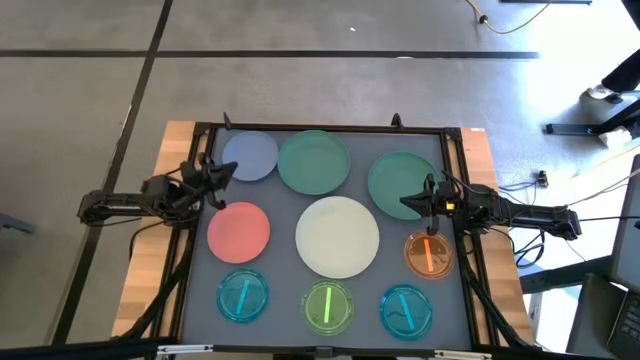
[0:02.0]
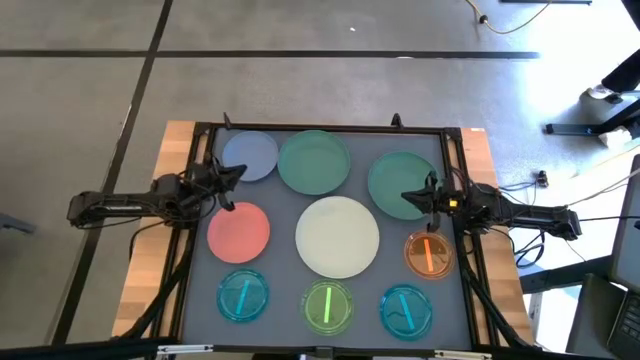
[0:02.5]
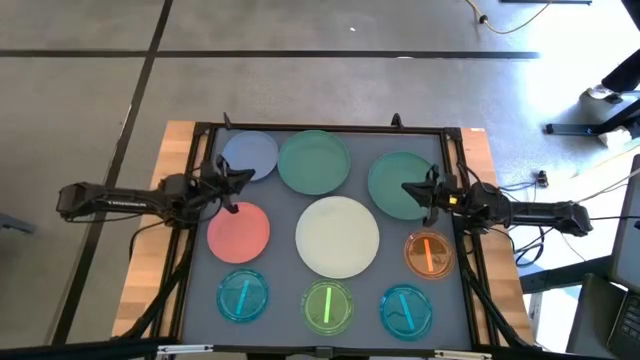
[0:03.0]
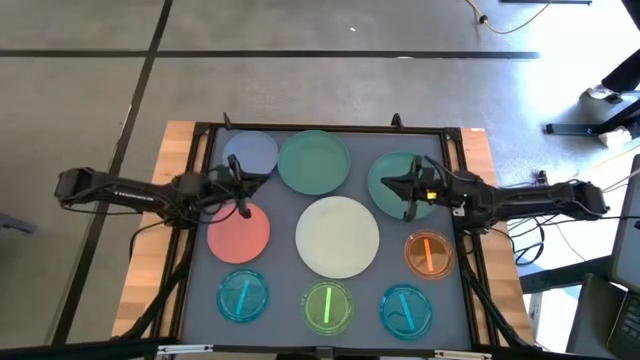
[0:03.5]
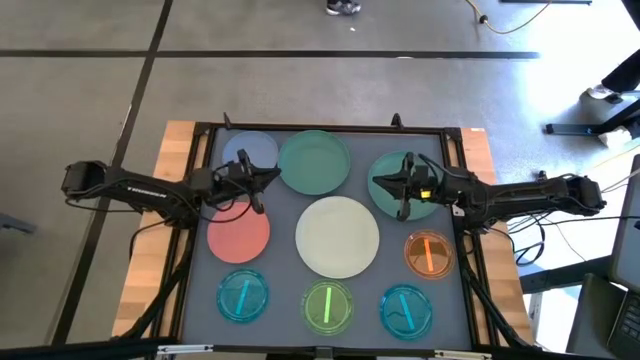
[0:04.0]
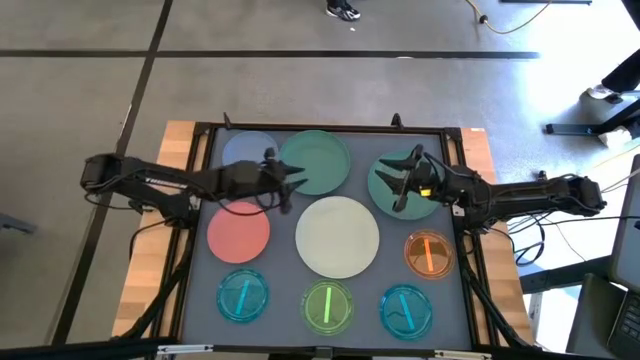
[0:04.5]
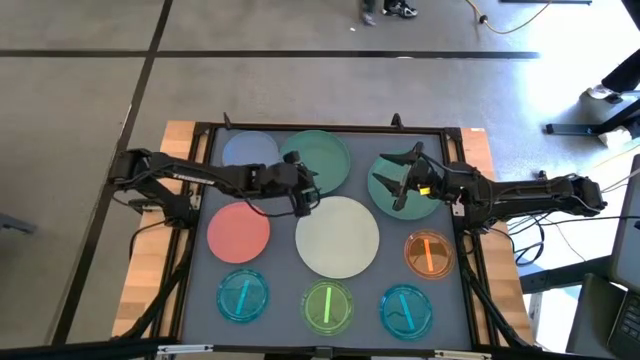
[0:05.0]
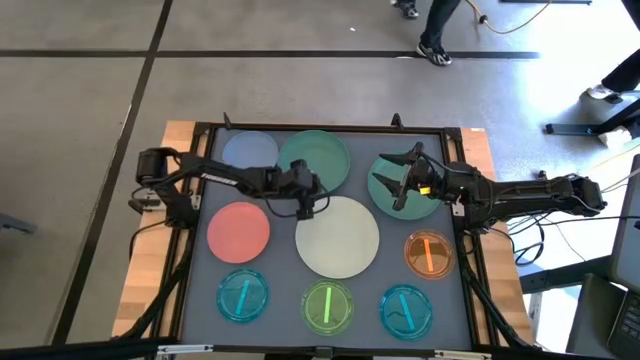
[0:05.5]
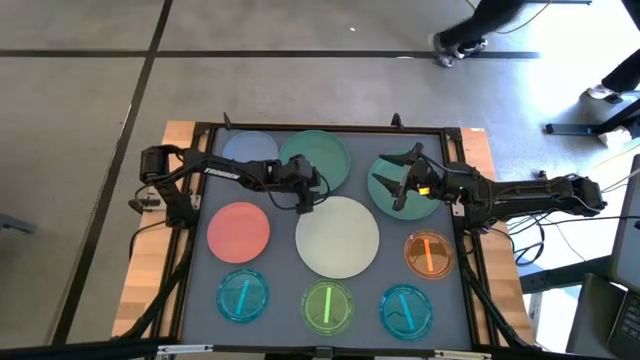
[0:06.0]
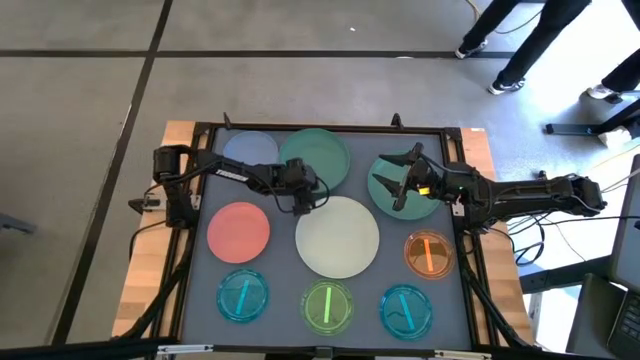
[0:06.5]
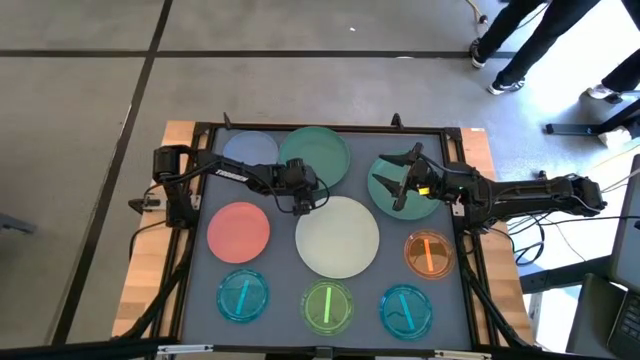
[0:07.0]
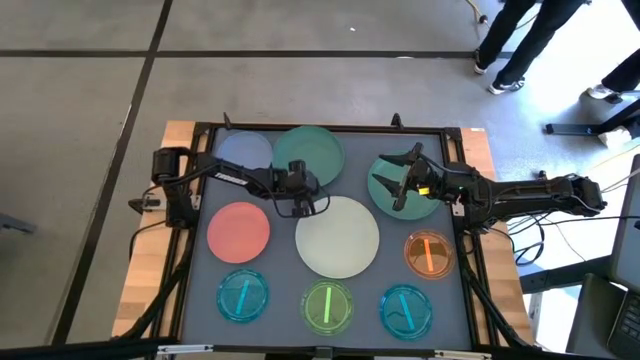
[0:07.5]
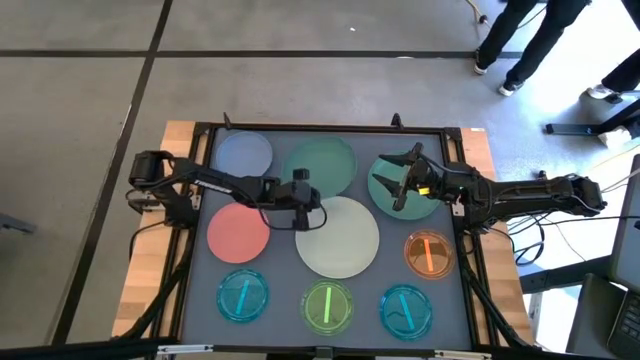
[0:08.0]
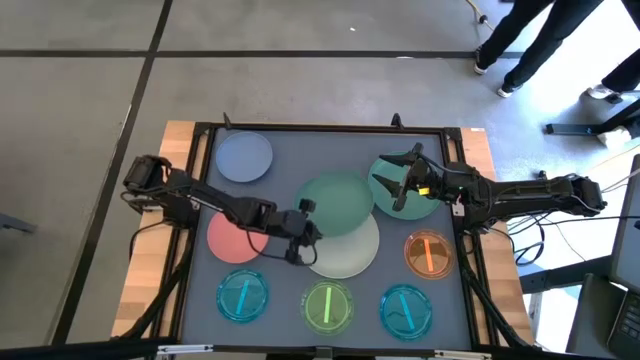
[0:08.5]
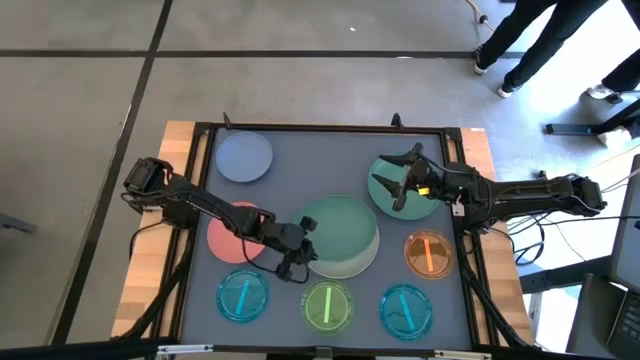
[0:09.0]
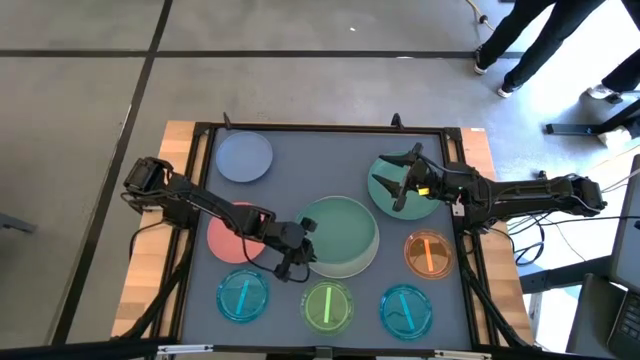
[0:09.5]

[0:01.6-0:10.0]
Task: Stack plastic plates
Stack the left green plate on the white plate

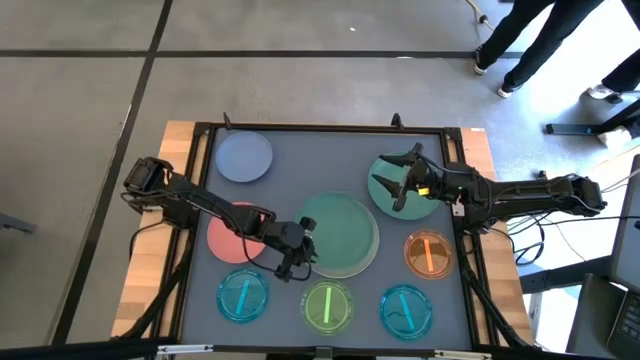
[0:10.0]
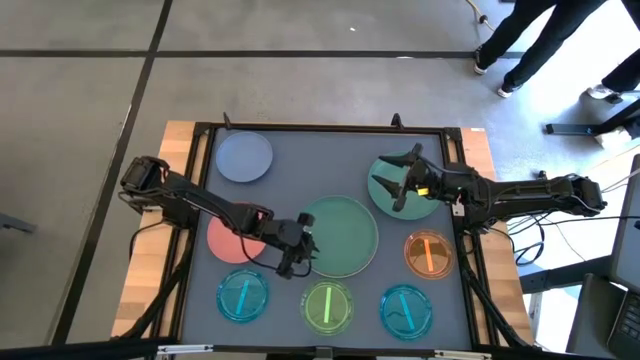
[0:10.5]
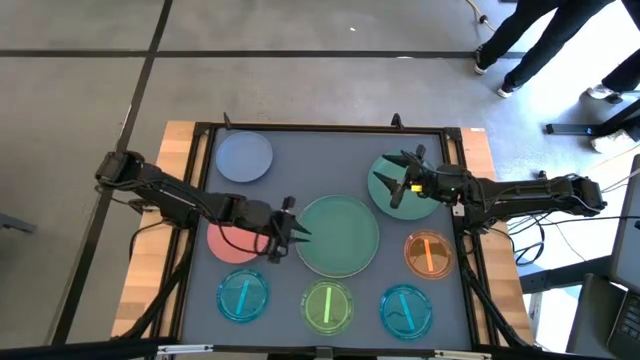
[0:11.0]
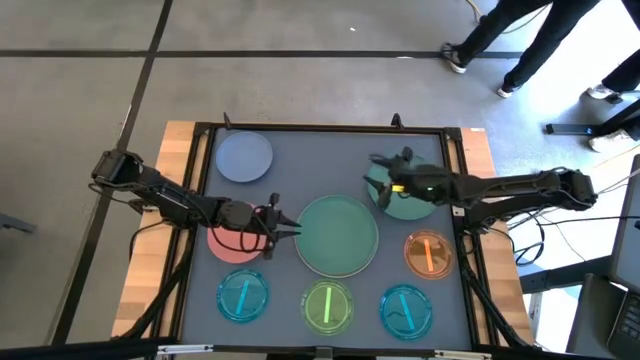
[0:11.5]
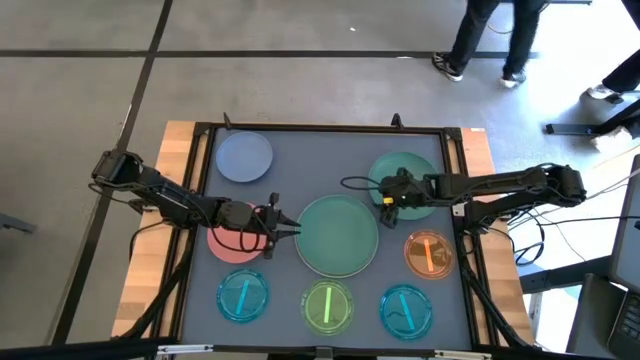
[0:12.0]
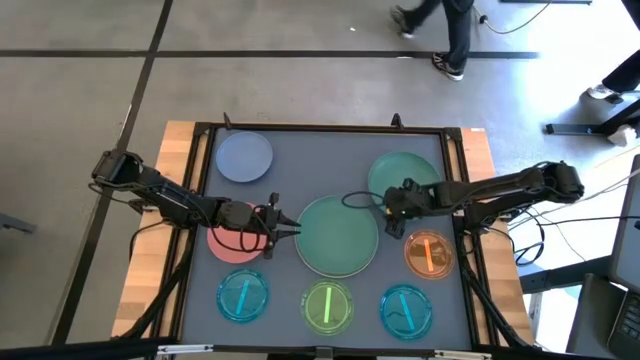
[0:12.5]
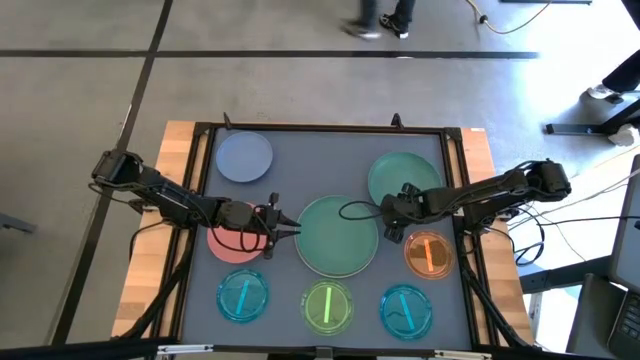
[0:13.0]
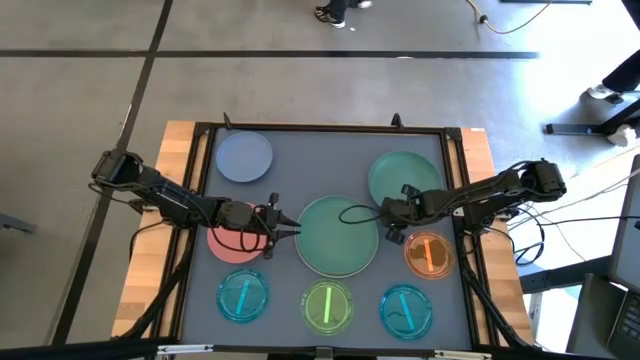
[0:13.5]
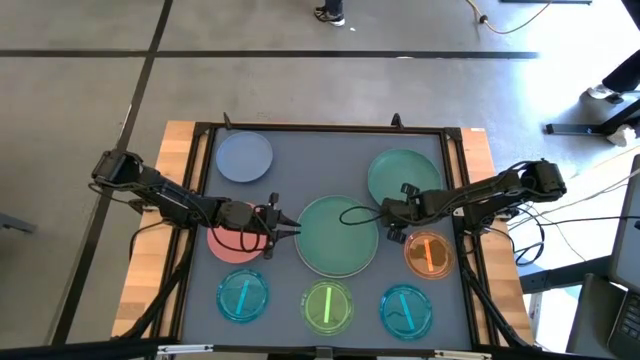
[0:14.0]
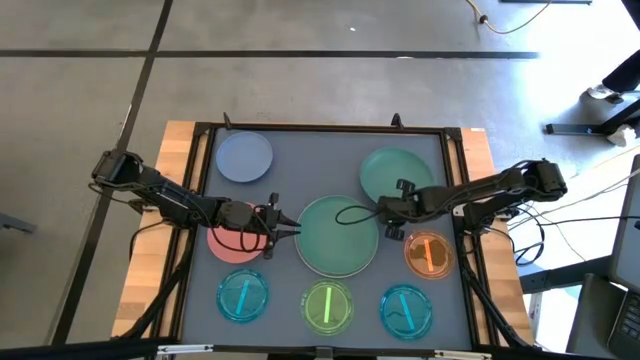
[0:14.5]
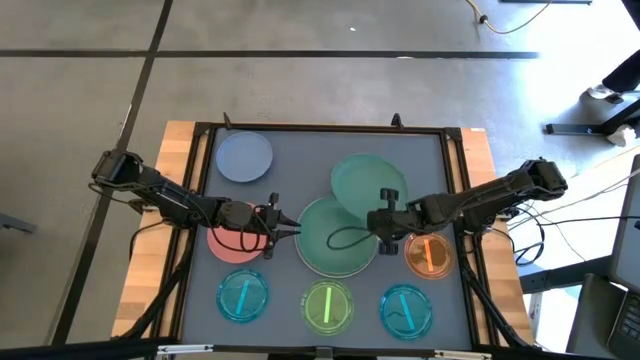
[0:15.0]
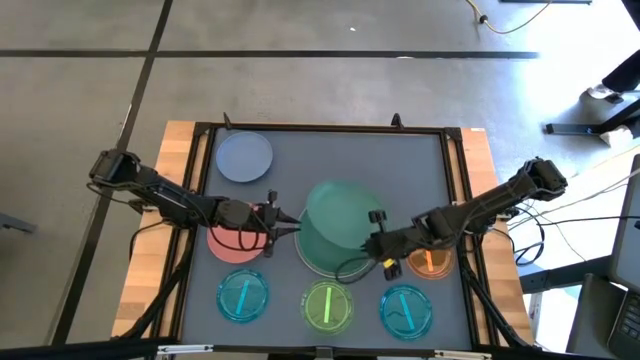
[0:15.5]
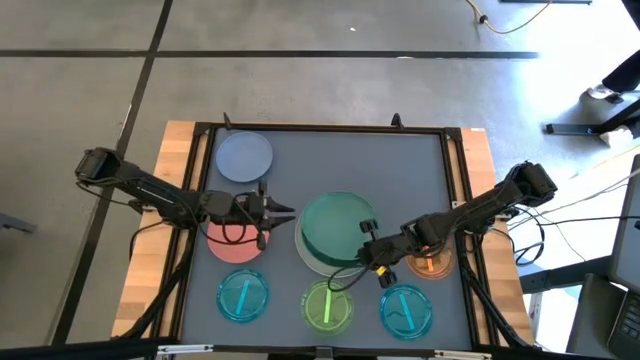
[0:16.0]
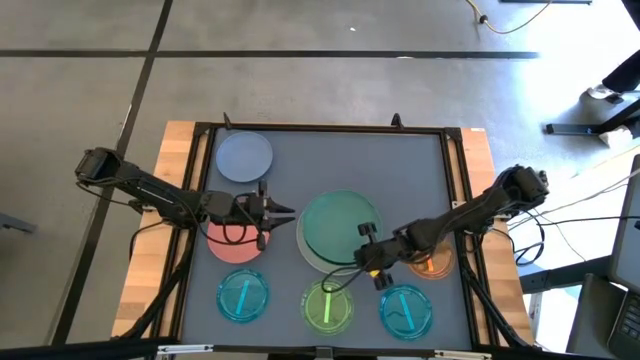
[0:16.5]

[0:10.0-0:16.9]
Stack the green plate on the mint green plate

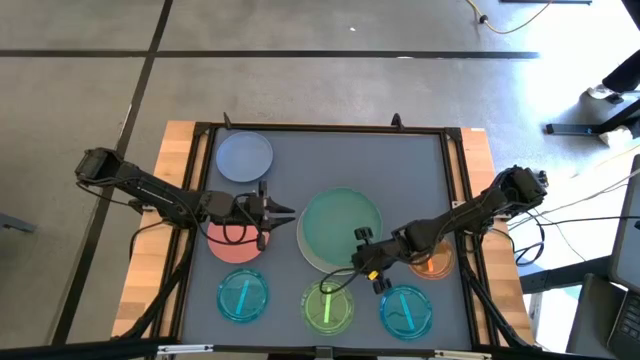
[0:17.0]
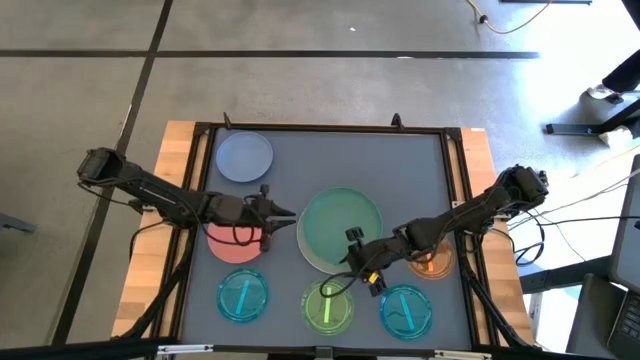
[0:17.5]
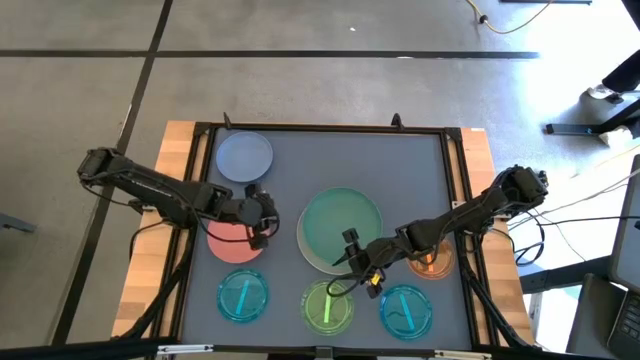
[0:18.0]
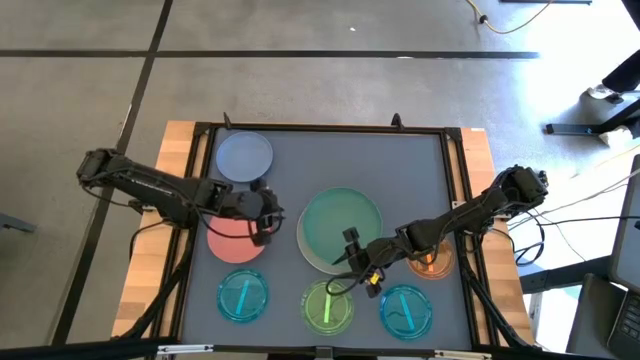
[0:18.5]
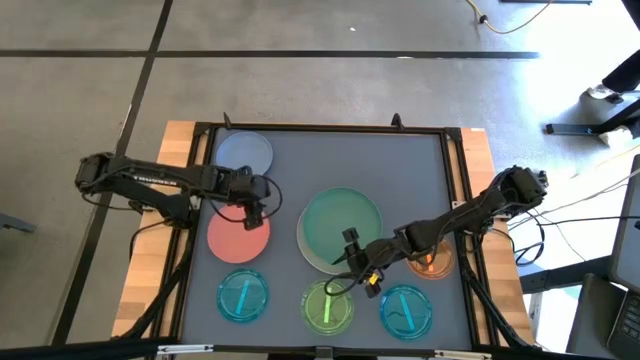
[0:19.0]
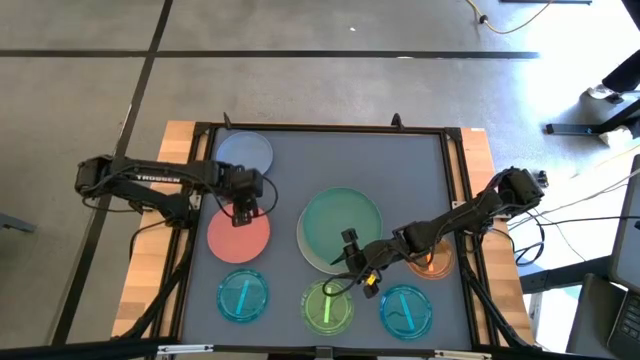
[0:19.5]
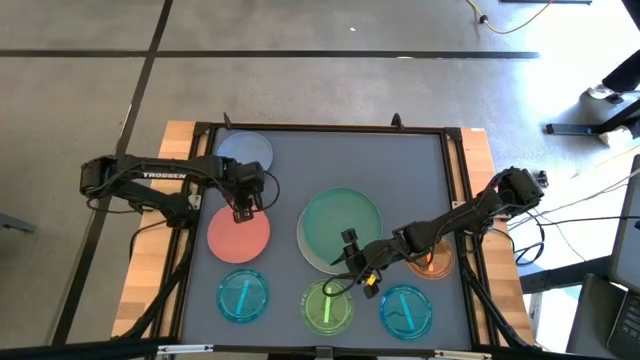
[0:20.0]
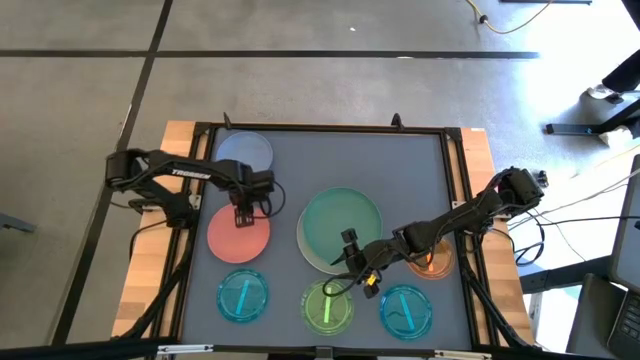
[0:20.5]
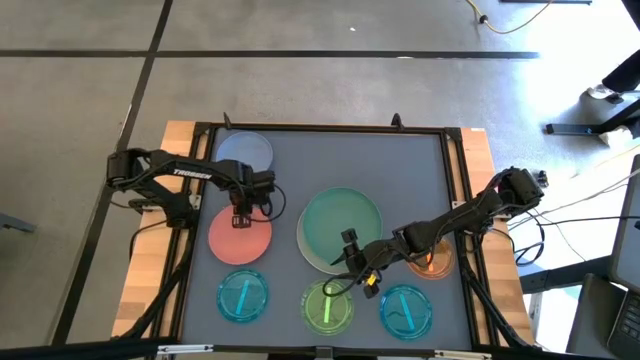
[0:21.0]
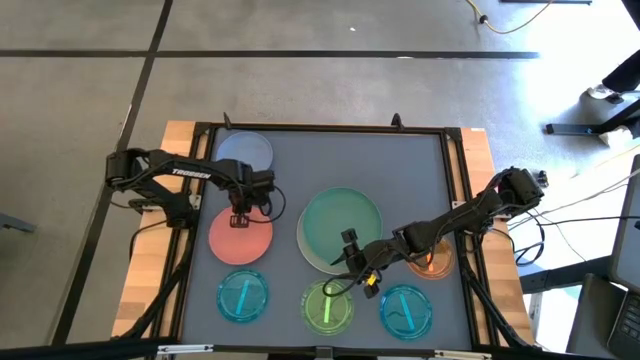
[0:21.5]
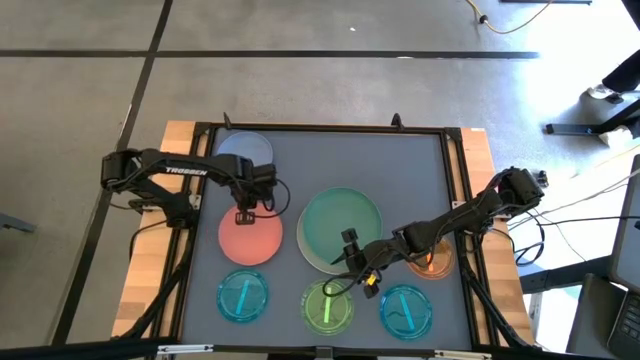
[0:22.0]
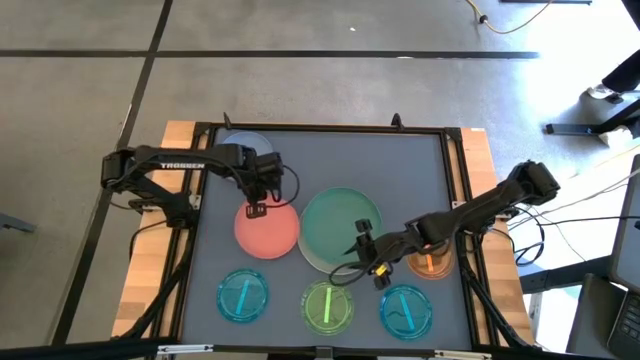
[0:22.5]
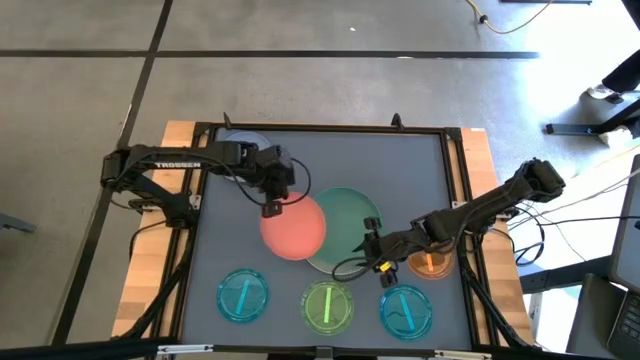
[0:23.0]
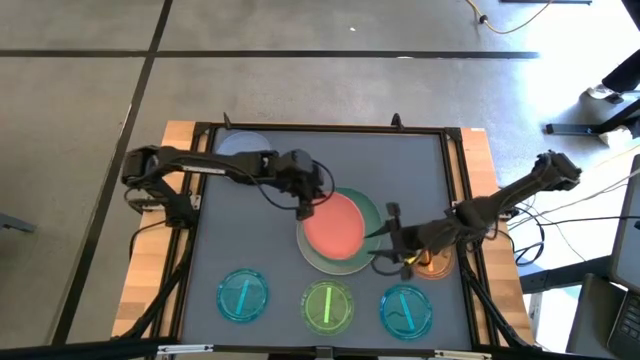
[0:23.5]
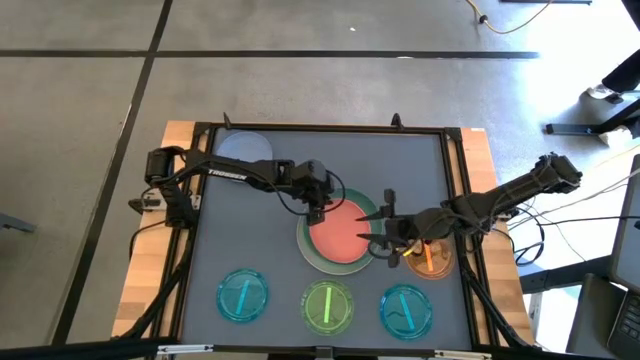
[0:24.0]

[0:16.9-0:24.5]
Stack the orange plate on the mint green plate
